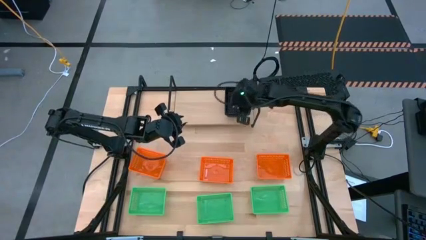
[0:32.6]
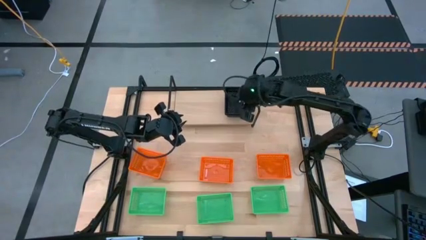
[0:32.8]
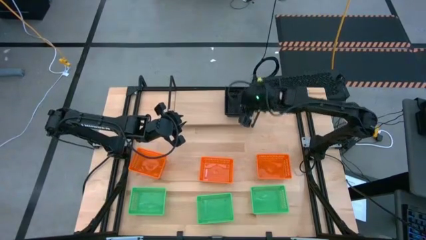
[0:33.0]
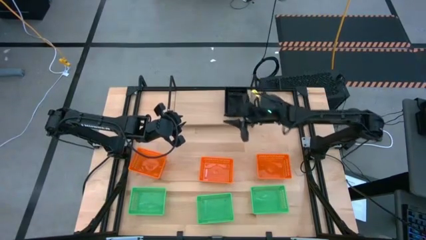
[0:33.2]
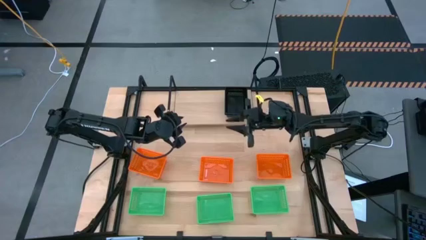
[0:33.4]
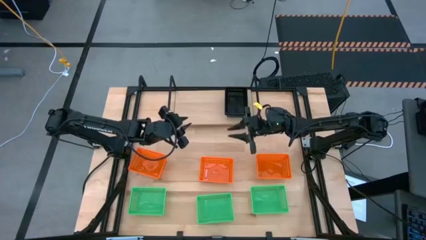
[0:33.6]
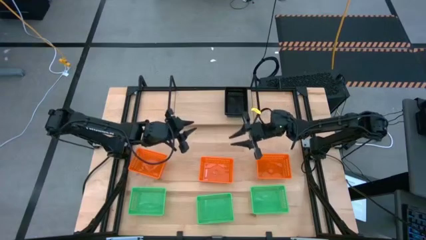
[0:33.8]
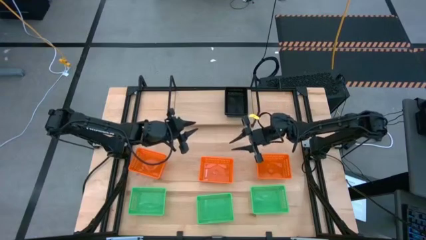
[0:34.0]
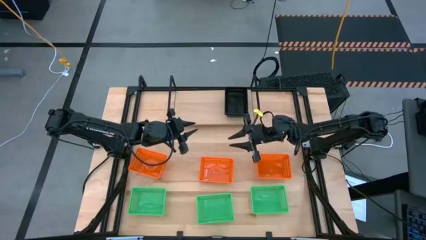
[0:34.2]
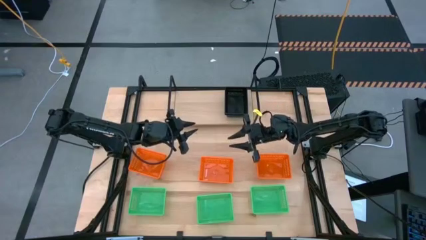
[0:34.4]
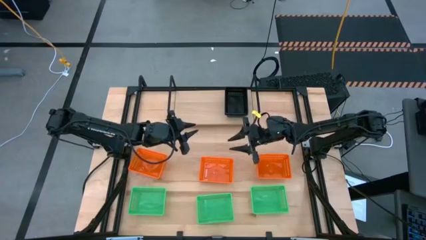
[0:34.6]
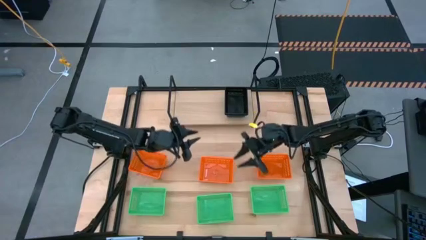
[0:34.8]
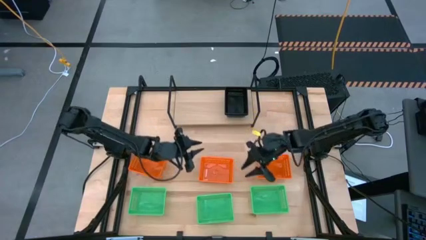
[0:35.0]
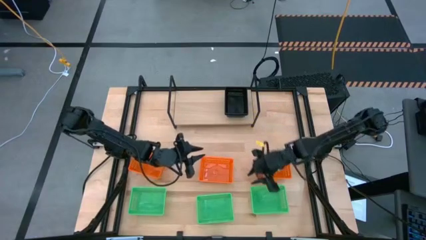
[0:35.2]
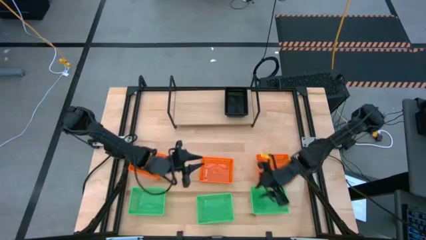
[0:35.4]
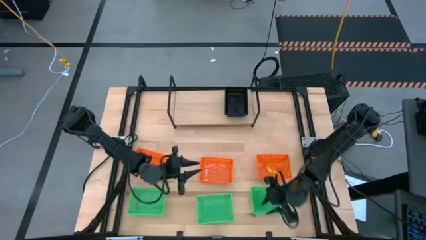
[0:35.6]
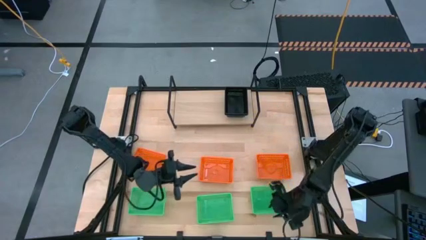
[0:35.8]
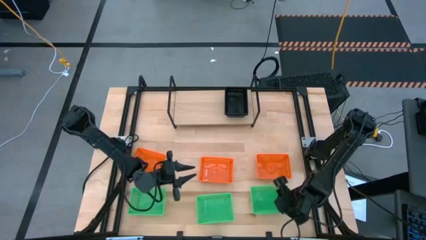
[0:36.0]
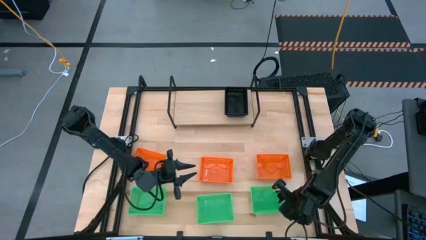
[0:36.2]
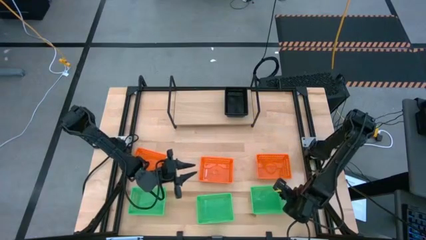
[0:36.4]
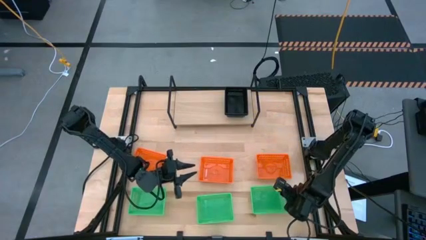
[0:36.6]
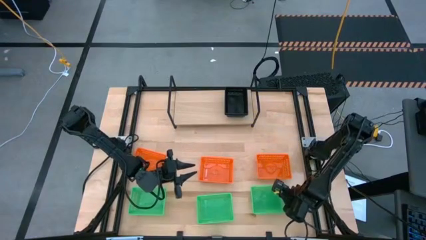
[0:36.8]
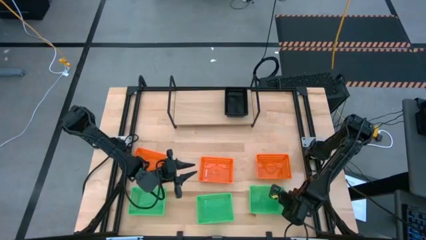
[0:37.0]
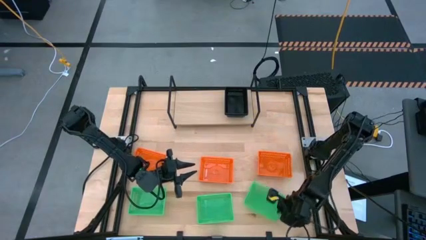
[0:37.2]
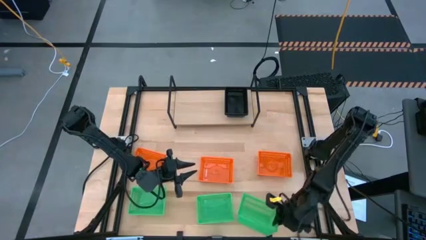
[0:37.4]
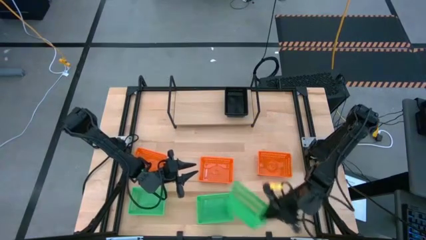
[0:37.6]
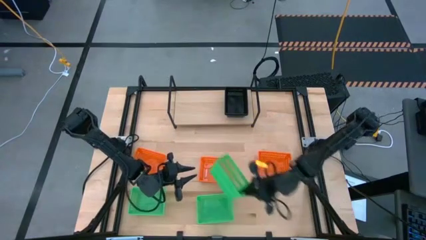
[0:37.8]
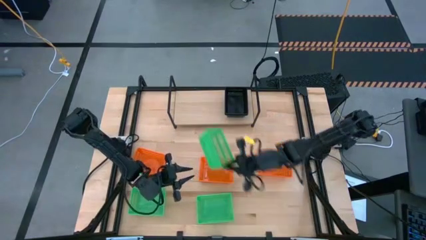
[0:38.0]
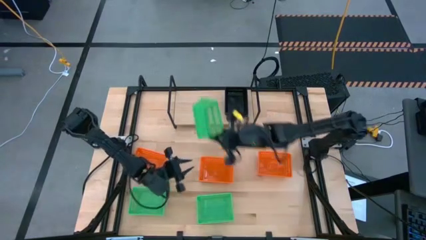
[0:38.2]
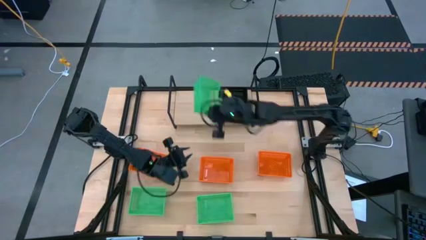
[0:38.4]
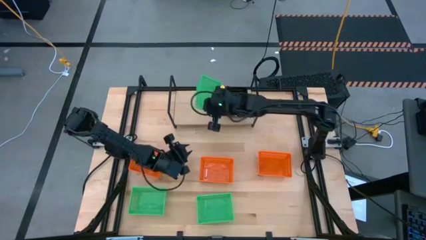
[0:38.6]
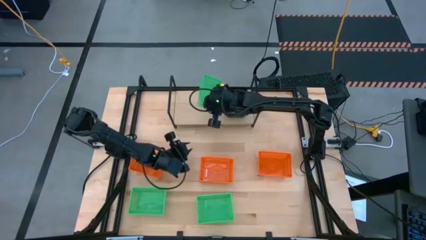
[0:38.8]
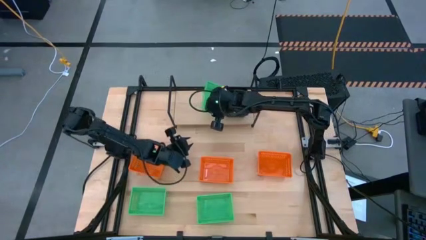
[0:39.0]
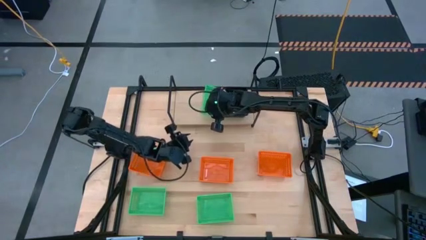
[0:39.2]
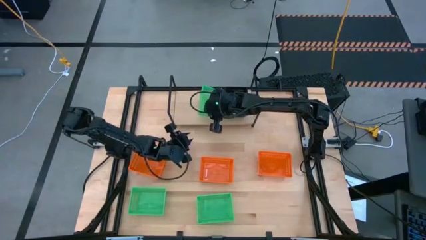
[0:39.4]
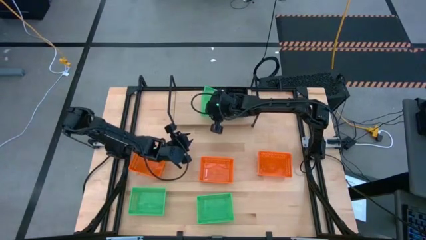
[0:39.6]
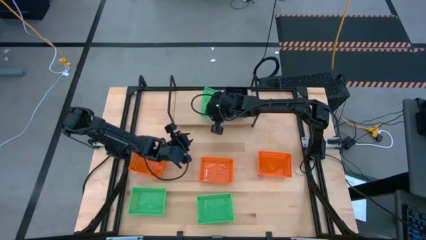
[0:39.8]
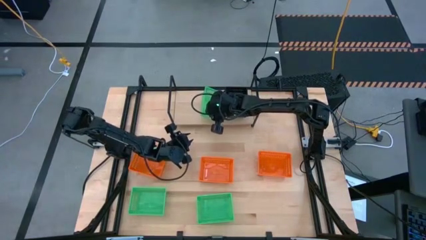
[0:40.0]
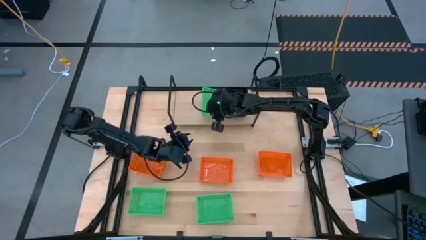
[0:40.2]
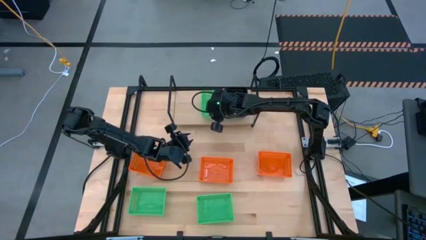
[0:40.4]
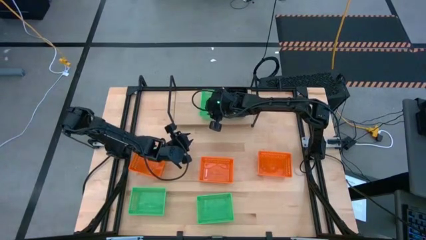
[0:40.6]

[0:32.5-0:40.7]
Task: Stack baskets on shelf by color
Put the right green bin on the shelf

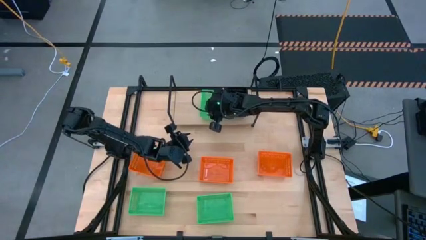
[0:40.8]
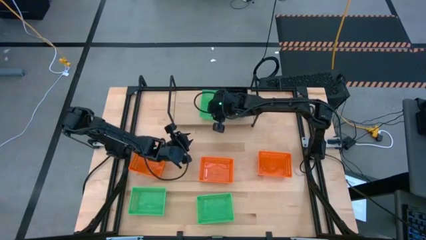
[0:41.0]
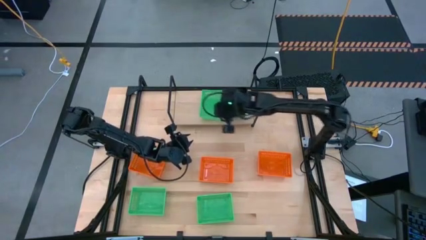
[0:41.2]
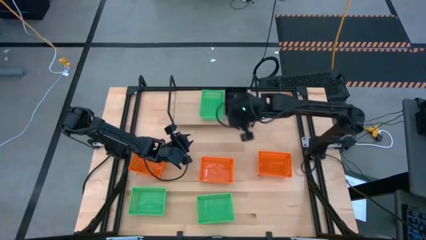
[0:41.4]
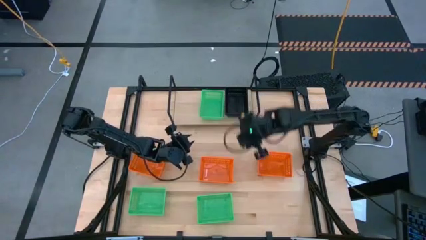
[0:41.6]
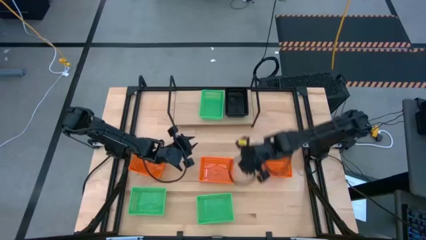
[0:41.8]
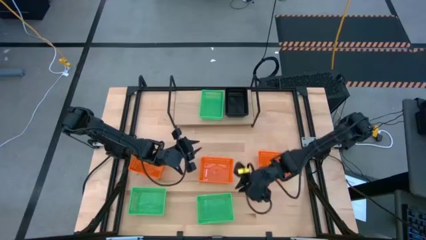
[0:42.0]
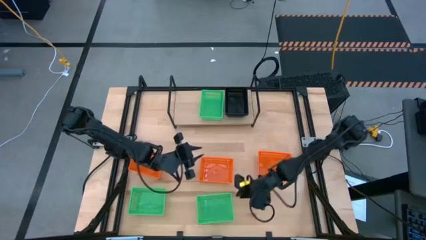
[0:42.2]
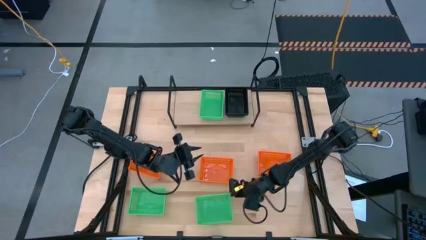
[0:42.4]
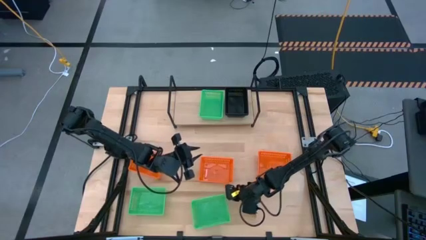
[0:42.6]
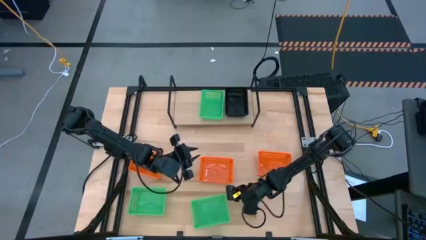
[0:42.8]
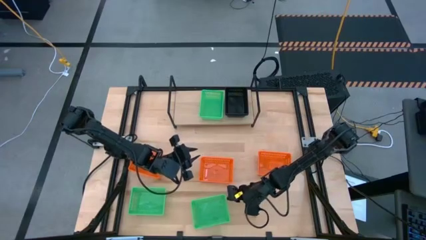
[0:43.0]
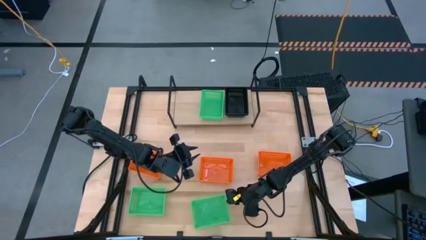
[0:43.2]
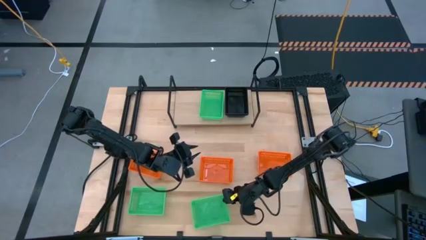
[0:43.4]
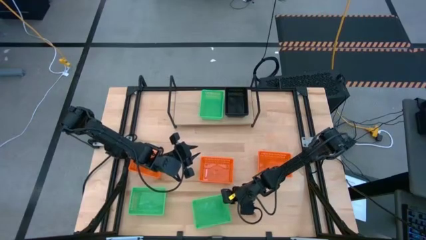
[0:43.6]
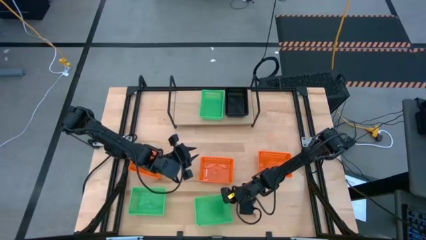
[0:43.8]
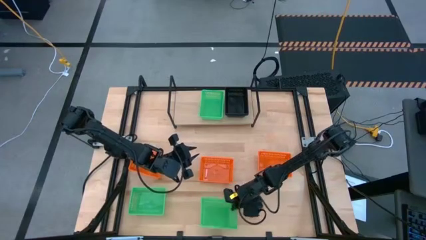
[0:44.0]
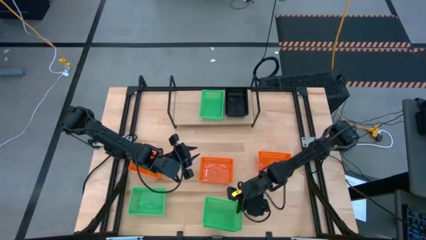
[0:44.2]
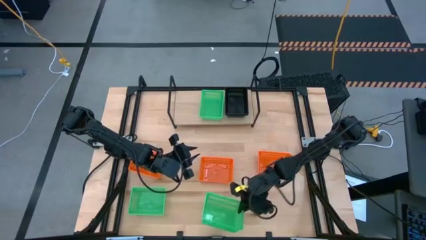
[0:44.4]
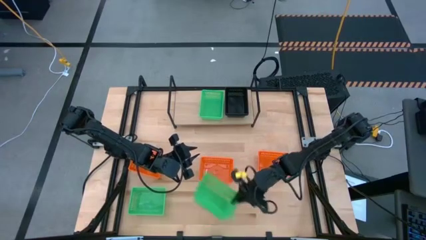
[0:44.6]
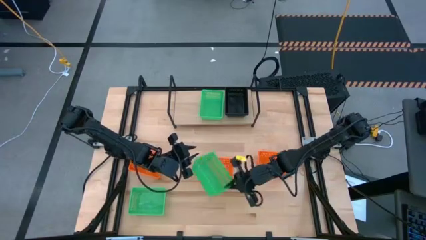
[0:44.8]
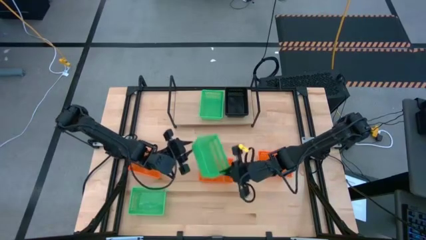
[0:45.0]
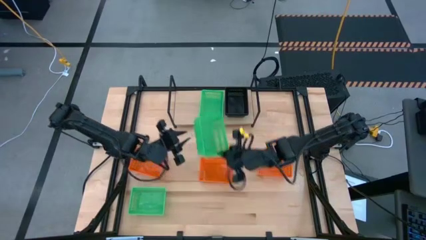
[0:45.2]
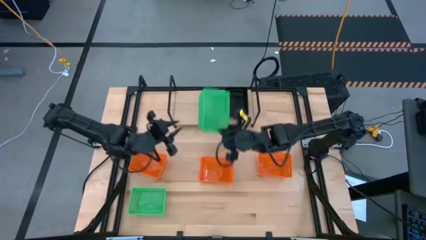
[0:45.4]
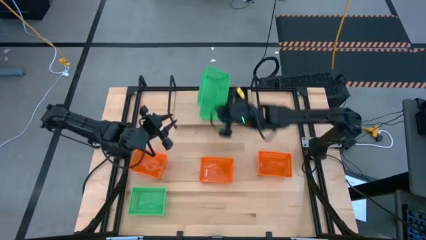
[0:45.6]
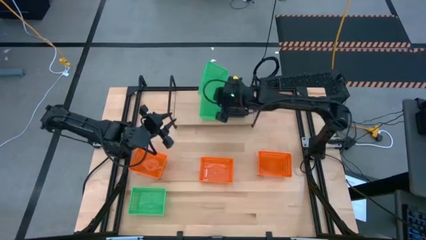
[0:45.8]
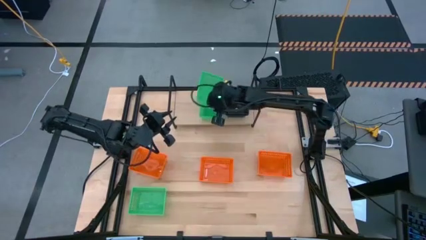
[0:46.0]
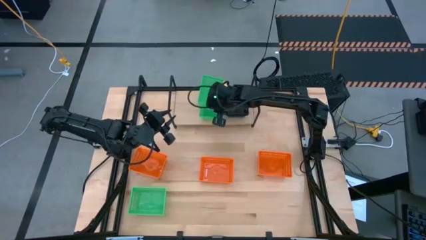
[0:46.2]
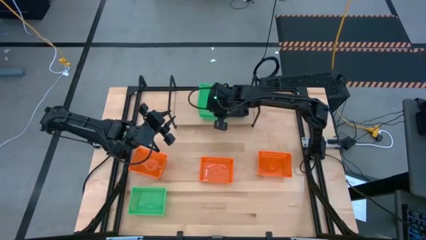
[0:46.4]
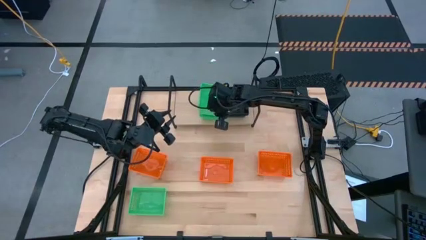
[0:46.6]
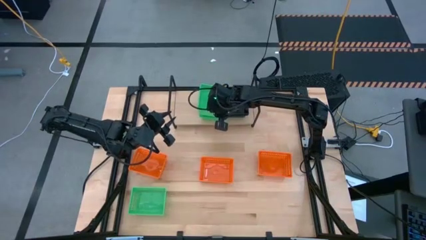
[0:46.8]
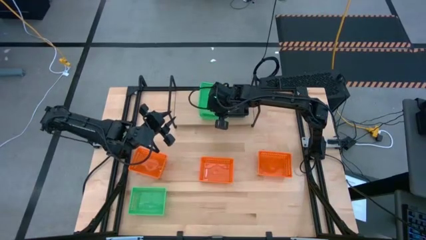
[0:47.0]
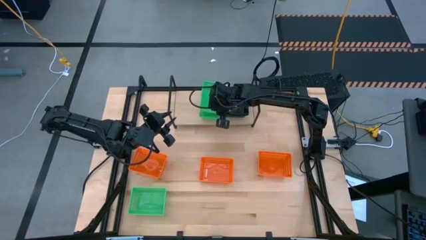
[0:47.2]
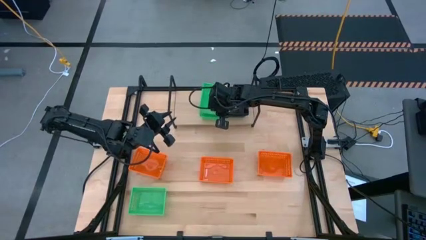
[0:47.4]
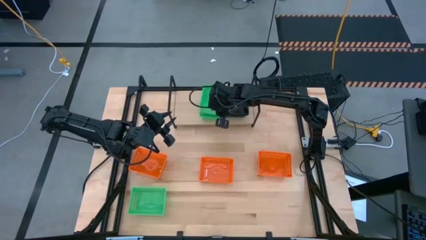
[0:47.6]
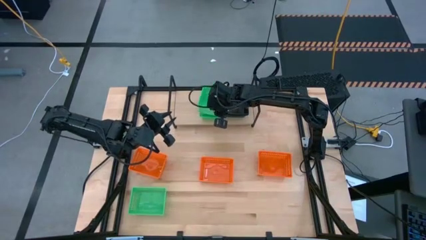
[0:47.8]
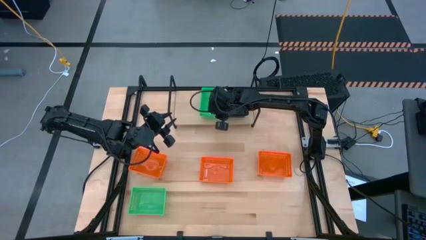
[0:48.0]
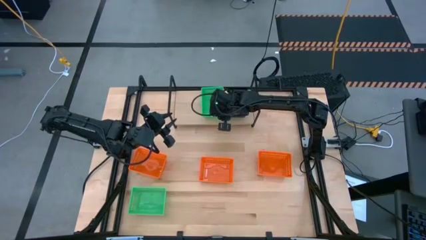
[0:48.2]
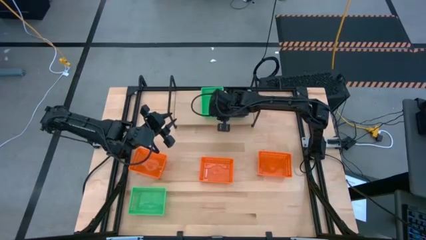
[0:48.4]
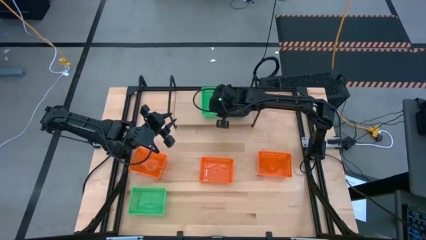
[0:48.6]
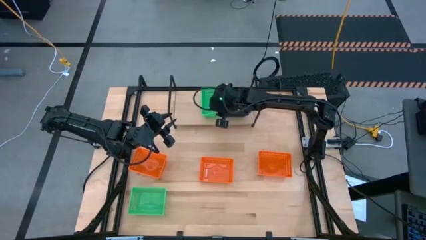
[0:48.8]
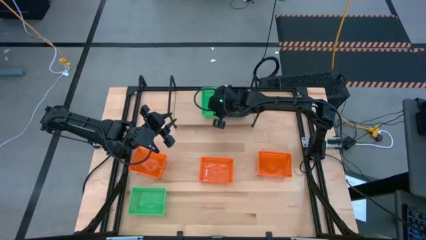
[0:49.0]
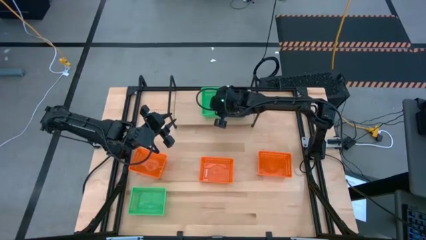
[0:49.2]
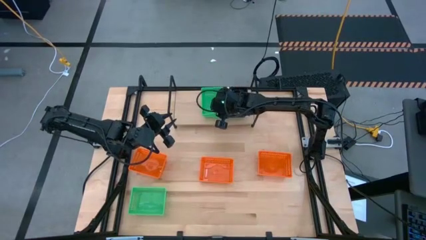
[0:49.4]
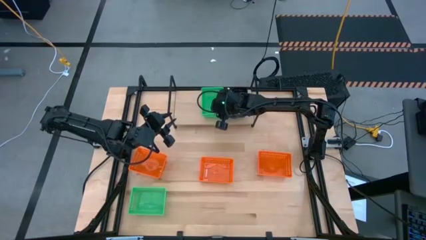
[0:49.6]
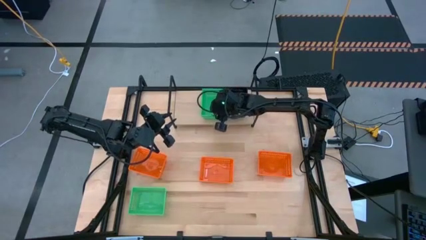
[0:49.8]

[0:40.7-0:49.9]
Stack the right green bin on the green bin on the shelf

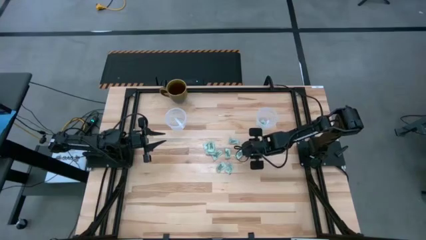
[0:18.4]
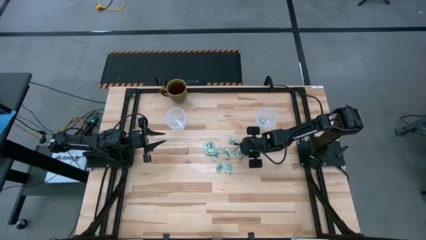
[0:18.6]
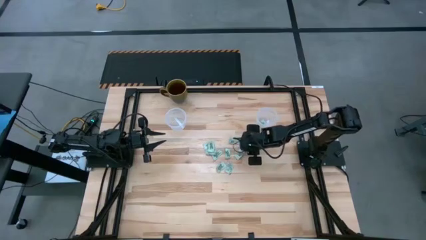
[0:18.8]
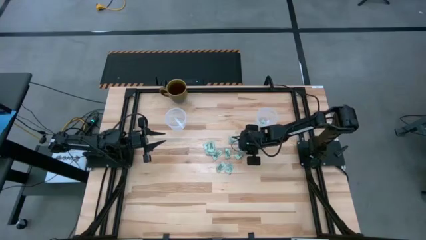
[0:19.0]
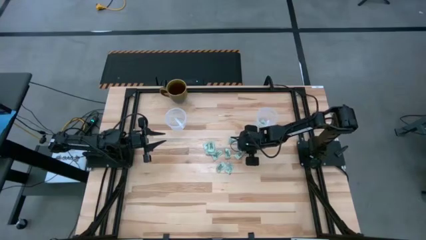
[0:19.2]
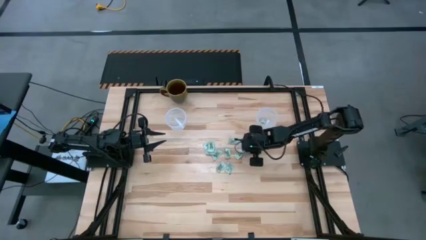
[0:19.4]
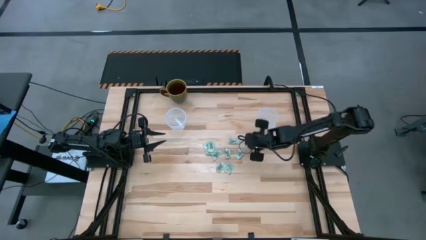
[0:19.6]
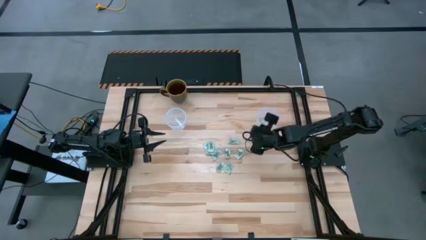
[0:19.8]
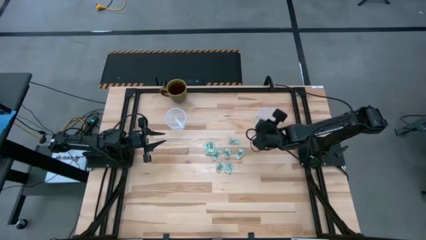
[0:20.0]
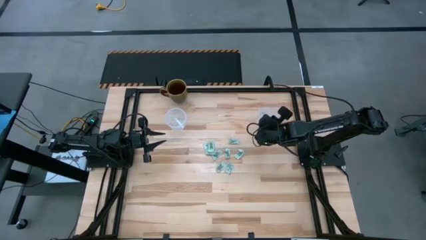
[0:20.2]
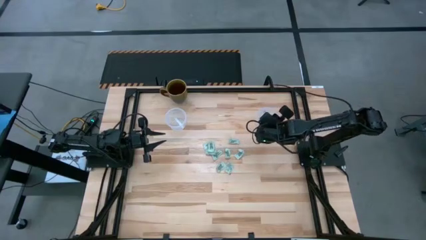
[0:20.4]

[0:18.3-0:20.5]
Task: Pick and place items into bin
Put the stevia packet into the right transparent bin
